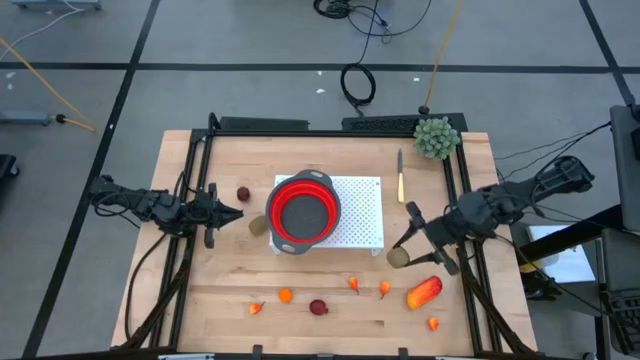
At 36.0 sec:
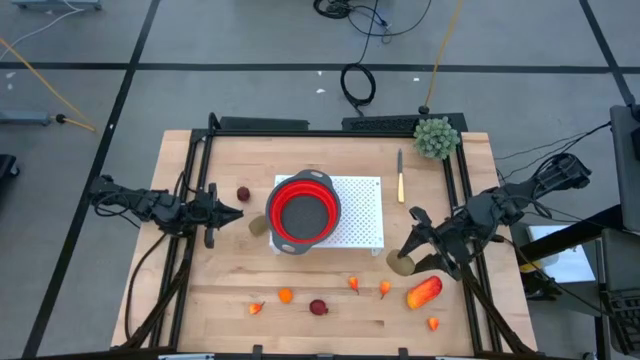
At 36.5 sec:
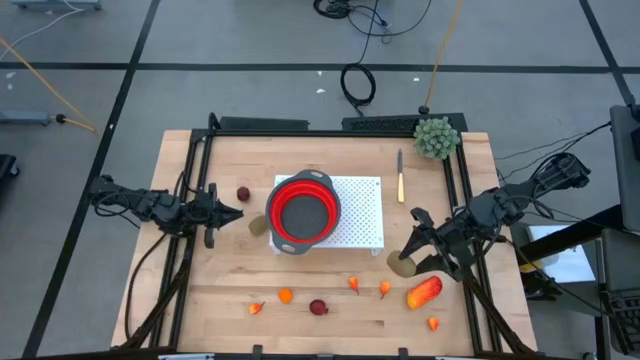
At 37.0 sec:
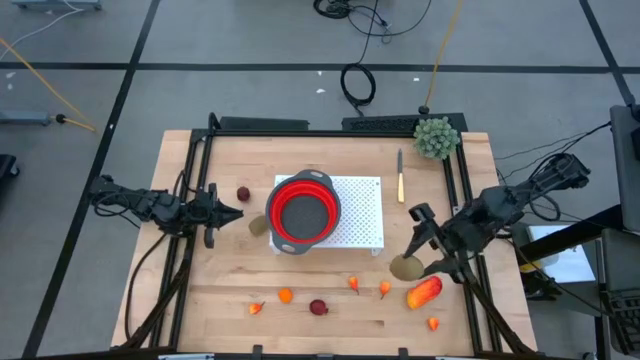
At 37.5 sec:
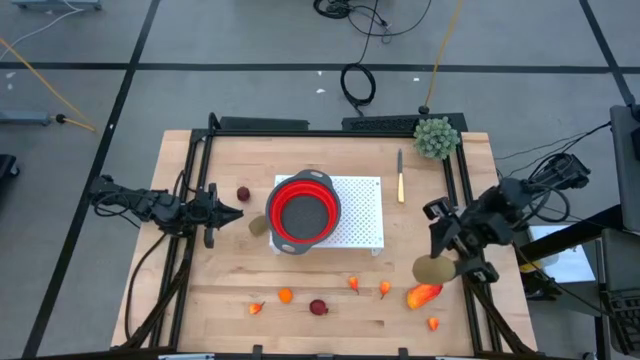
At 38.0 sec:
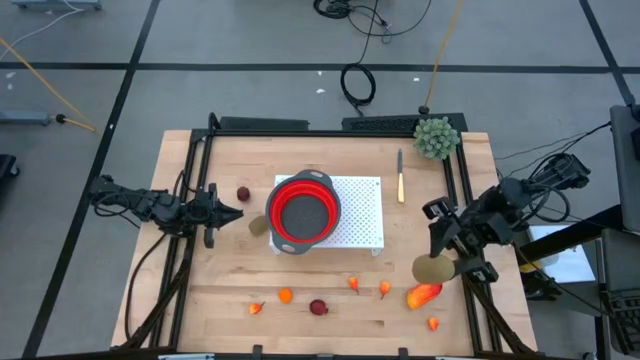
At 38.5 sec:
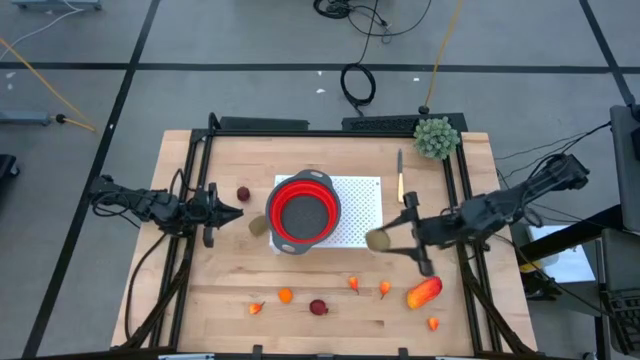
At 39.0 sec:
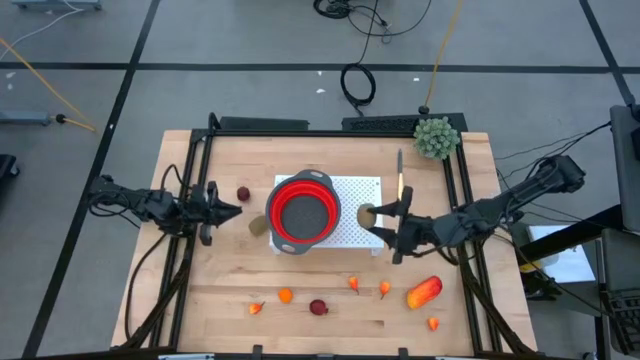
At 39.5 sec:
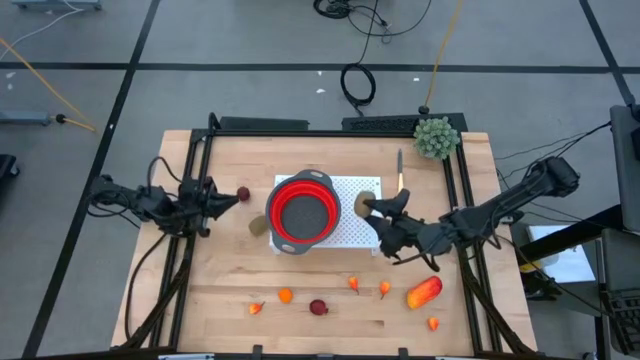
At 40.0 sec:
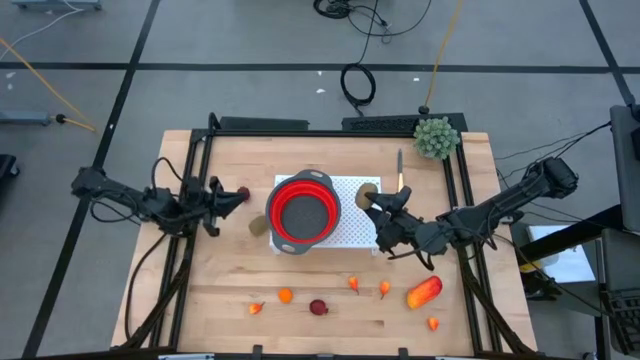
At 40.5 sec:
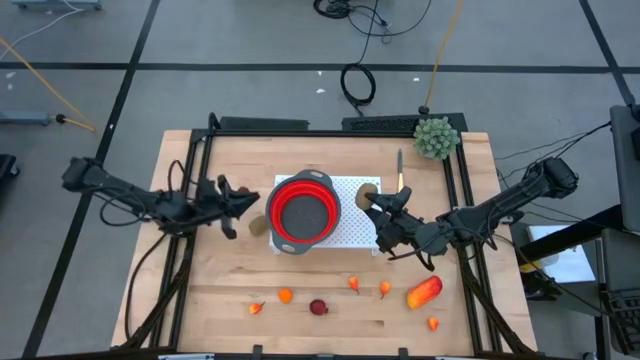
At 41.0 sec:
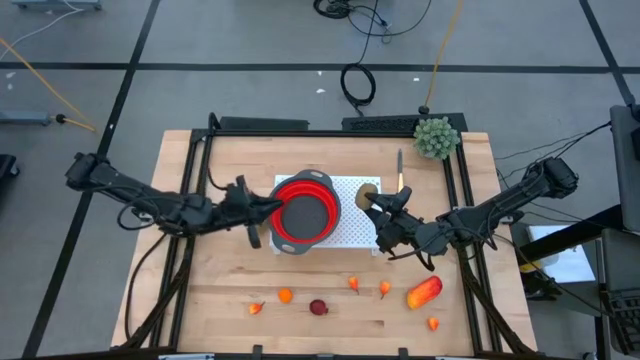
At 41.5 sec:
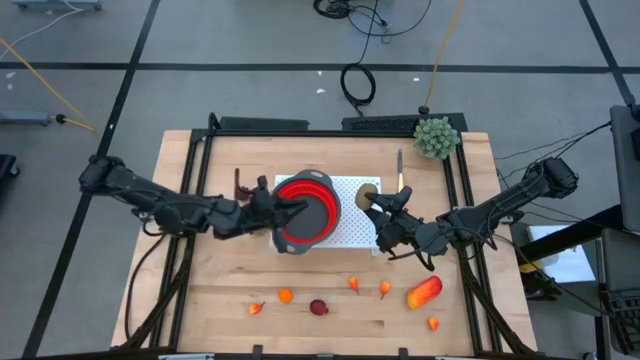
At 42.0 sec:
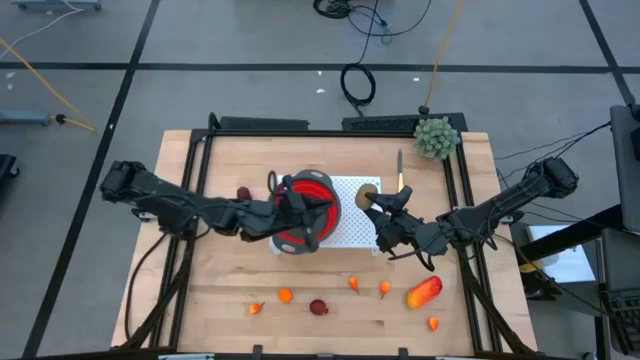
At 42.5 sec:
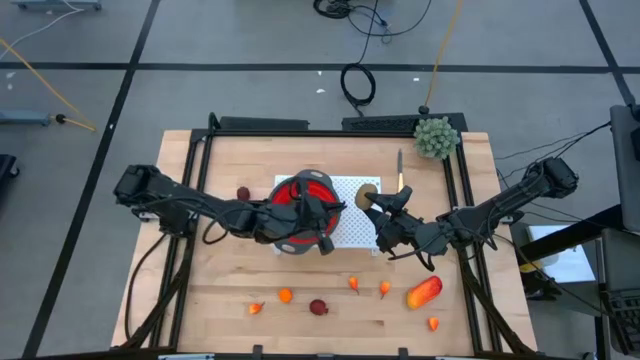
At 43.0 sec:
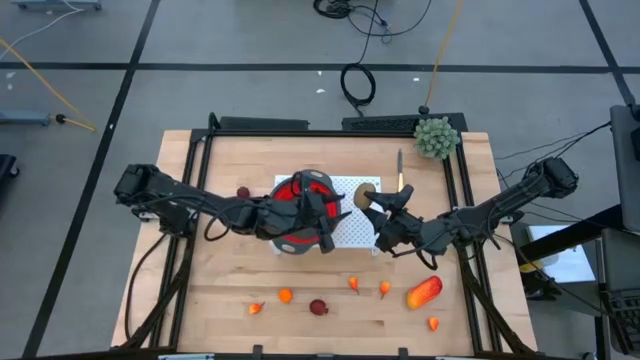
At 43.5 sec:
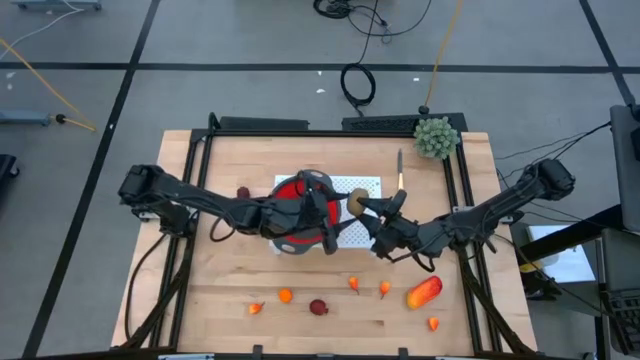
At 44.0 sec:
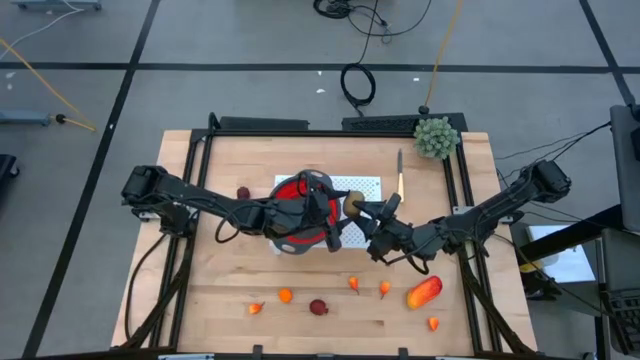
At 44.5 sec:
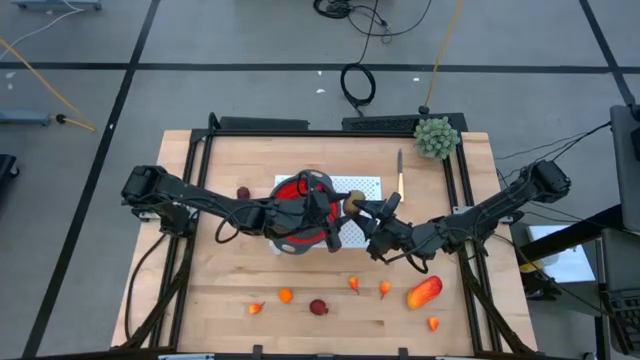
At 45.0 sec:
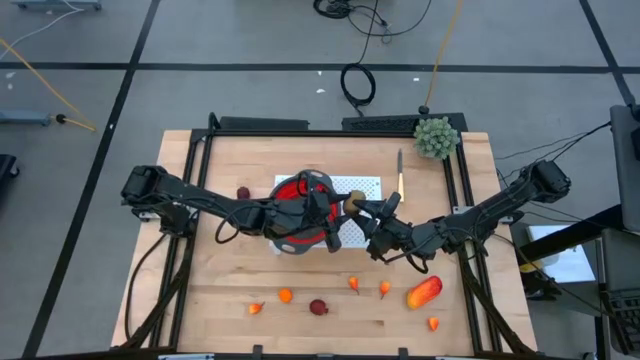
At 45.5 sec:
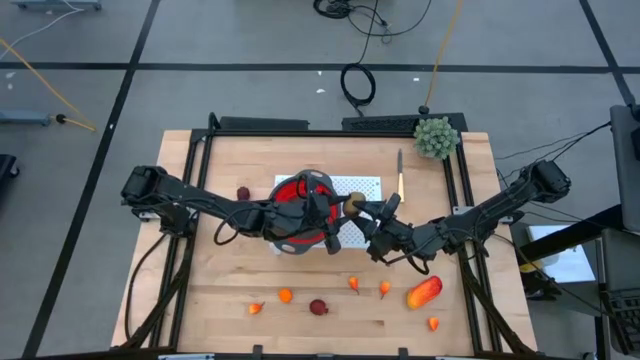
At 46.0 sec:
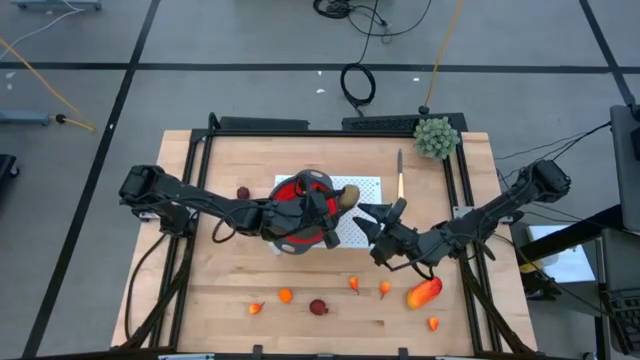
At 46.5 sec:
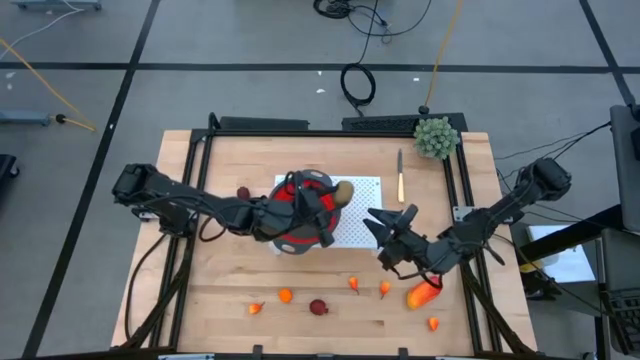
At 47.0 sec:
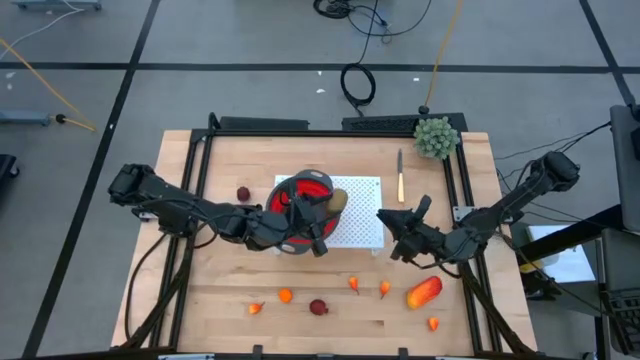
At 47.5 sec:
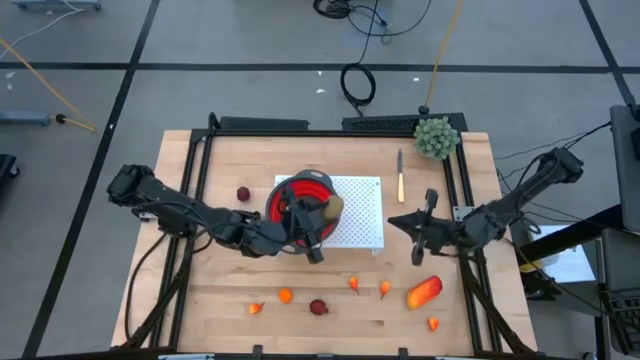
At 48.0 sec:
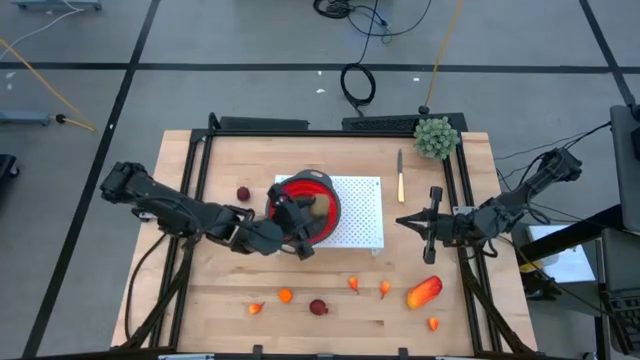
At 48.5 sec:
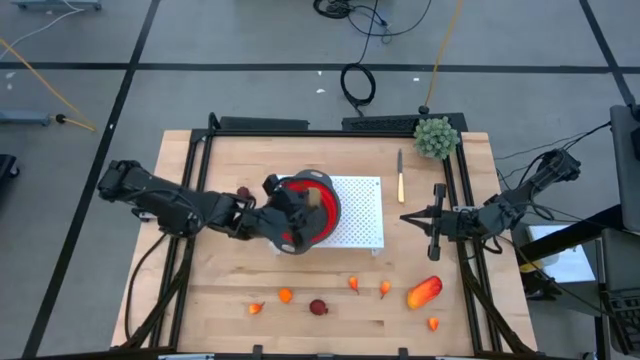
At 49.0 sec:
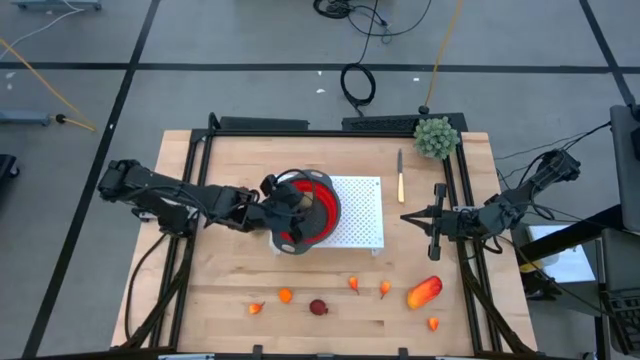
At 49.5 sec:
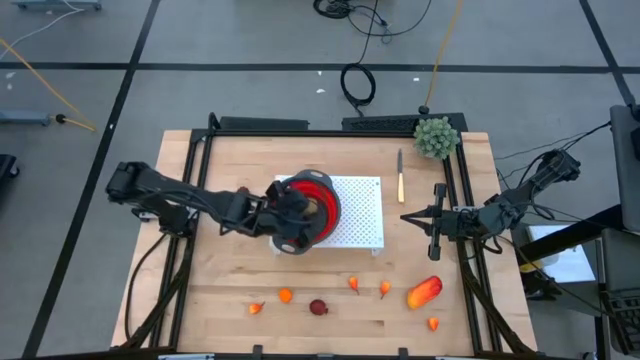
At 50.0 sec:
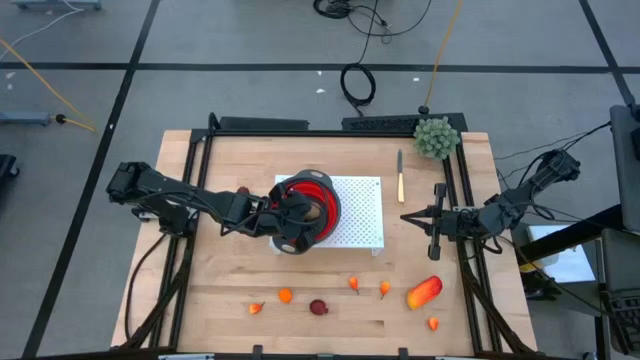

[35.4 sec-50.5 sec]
Task: Pick & Place Fruit
Put the right kiwi into the strainer bowl on the shelf
